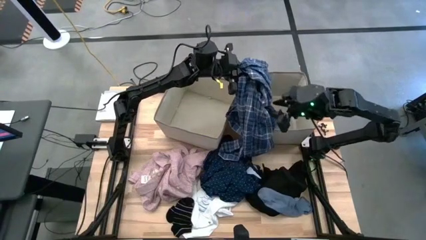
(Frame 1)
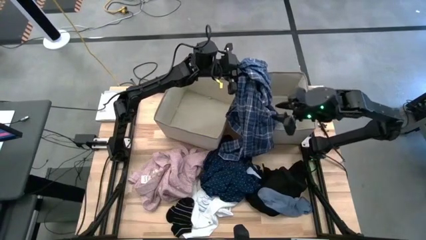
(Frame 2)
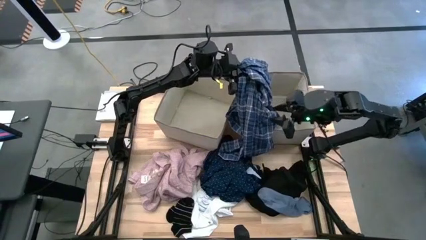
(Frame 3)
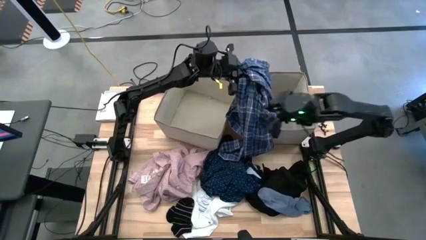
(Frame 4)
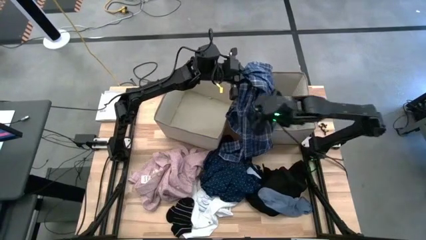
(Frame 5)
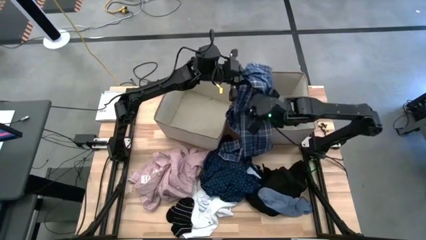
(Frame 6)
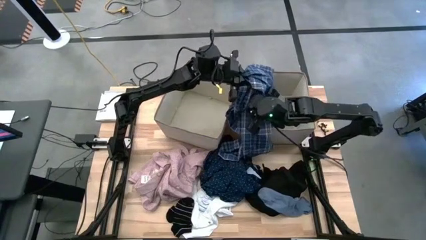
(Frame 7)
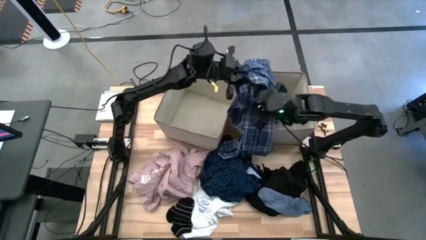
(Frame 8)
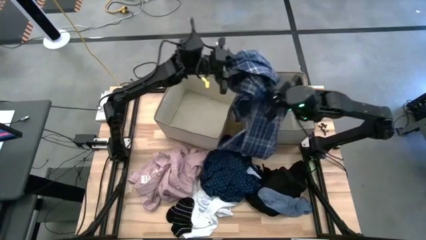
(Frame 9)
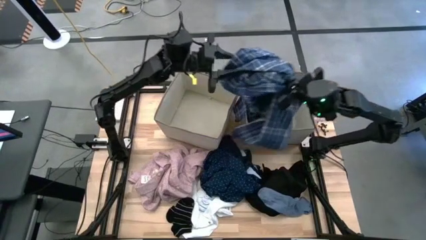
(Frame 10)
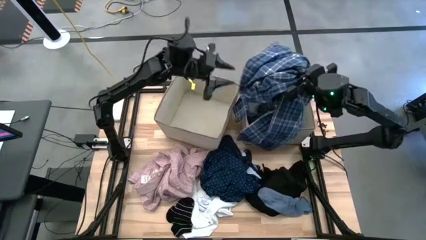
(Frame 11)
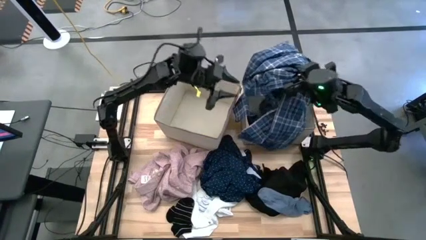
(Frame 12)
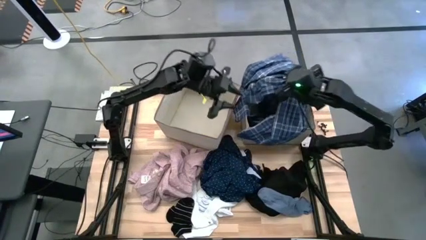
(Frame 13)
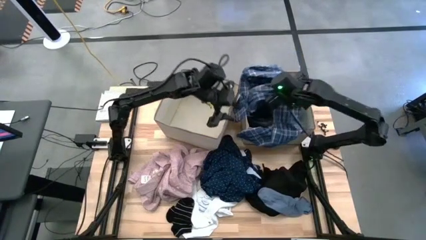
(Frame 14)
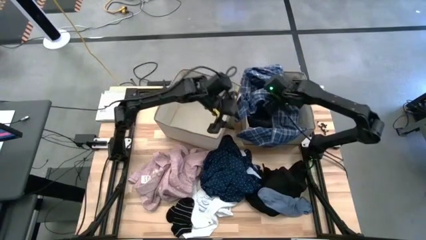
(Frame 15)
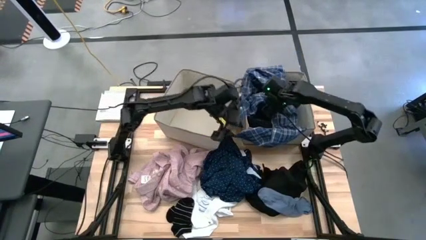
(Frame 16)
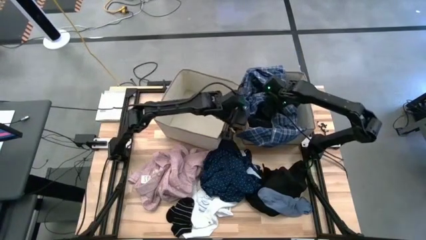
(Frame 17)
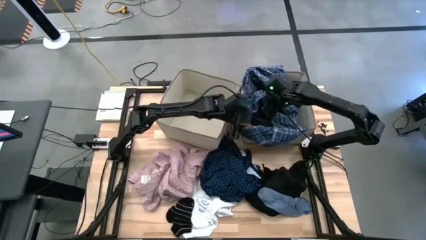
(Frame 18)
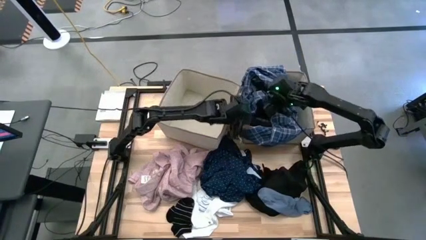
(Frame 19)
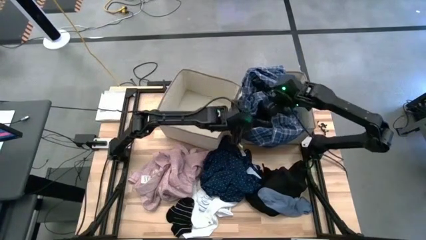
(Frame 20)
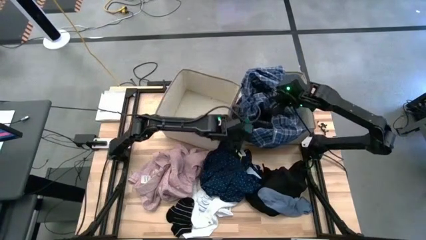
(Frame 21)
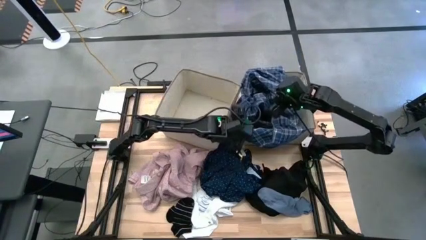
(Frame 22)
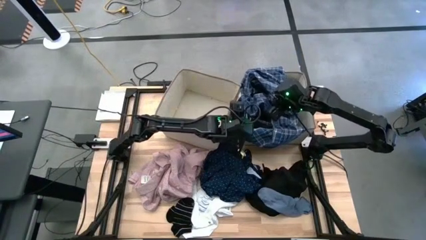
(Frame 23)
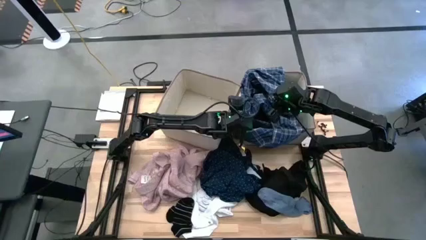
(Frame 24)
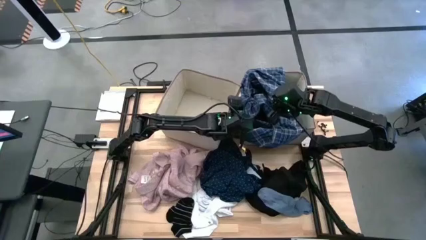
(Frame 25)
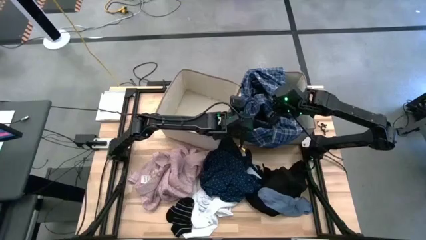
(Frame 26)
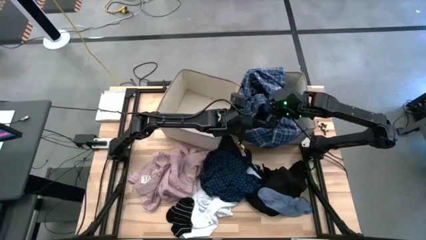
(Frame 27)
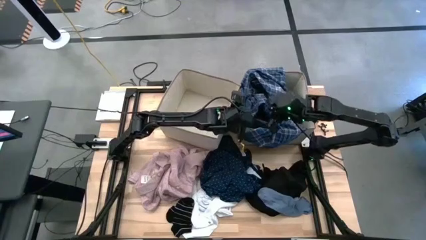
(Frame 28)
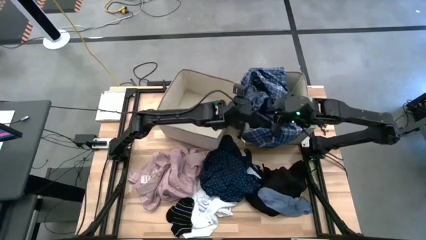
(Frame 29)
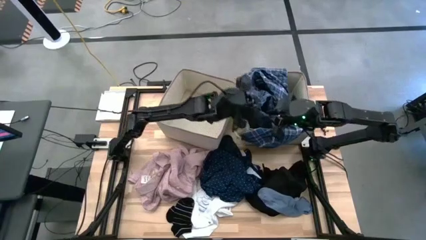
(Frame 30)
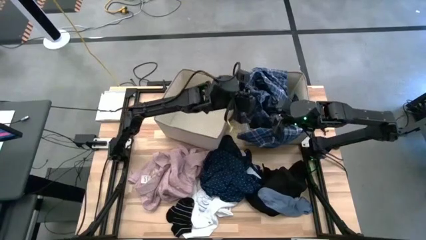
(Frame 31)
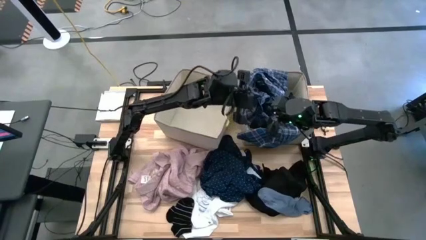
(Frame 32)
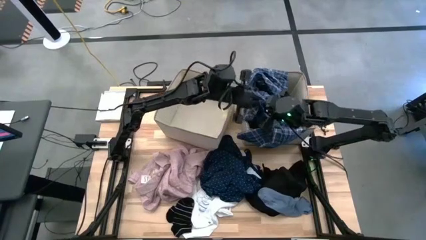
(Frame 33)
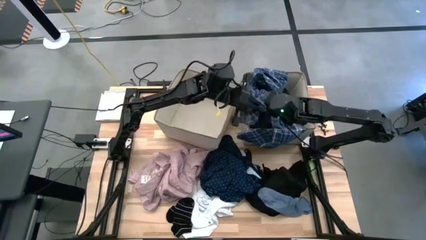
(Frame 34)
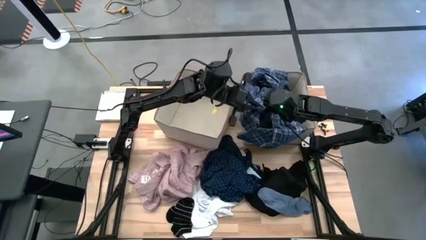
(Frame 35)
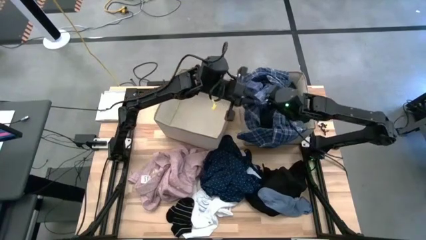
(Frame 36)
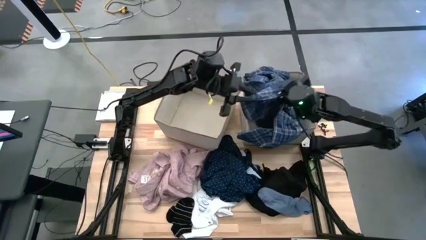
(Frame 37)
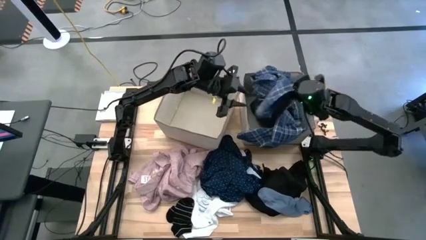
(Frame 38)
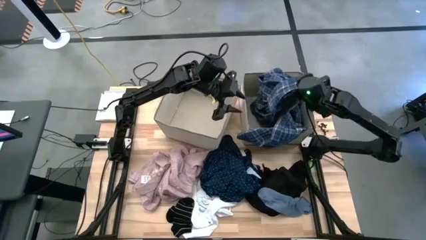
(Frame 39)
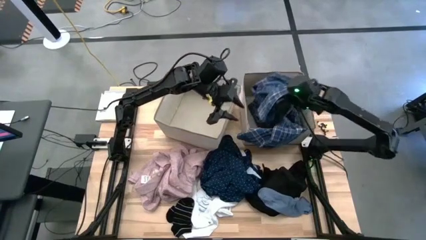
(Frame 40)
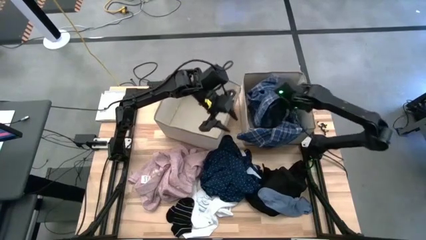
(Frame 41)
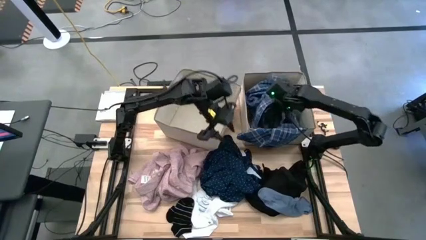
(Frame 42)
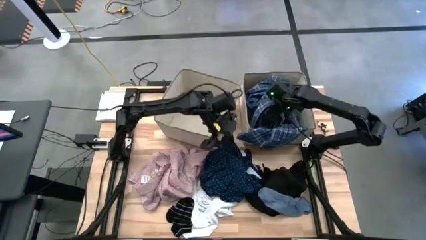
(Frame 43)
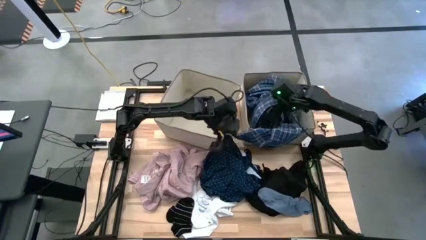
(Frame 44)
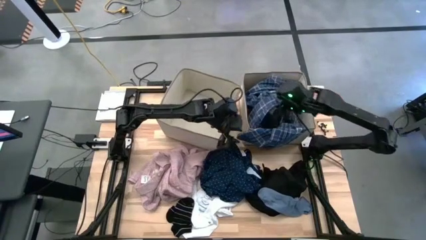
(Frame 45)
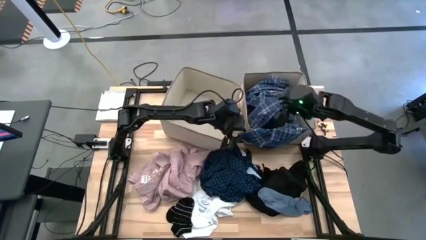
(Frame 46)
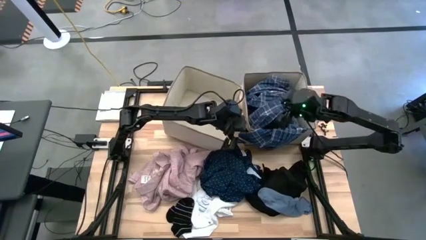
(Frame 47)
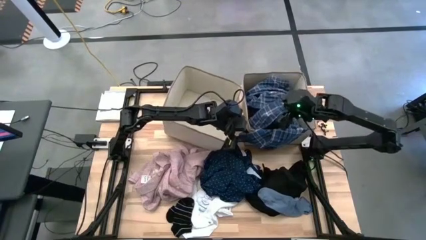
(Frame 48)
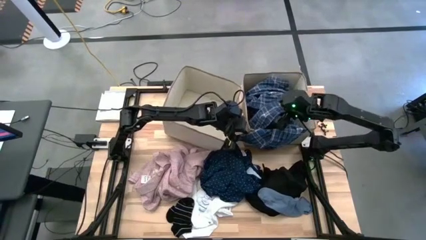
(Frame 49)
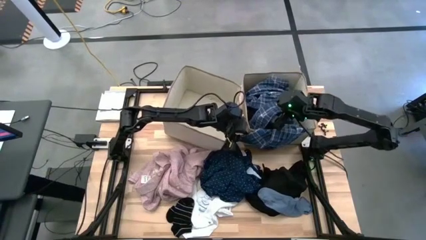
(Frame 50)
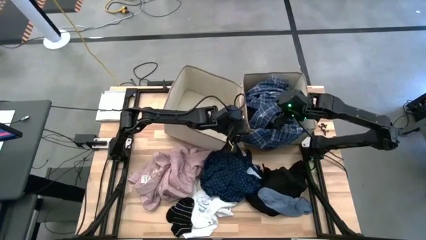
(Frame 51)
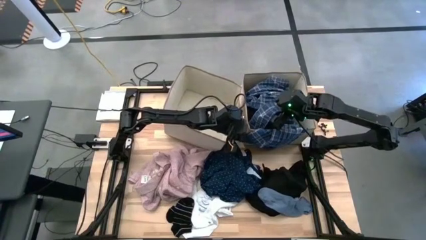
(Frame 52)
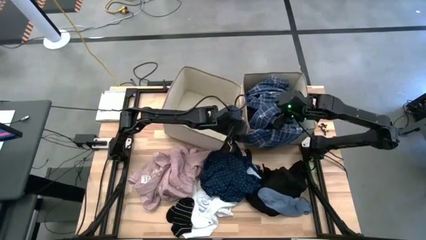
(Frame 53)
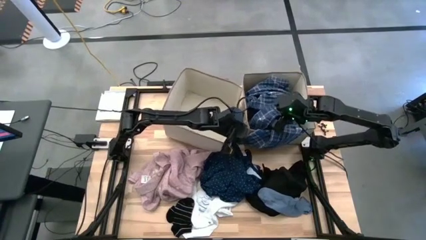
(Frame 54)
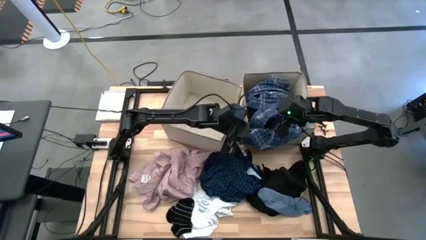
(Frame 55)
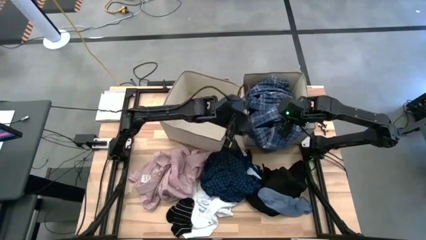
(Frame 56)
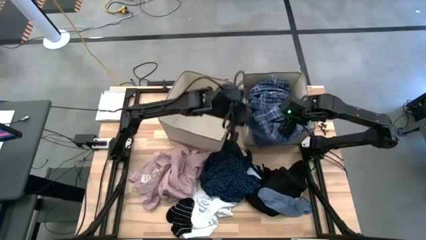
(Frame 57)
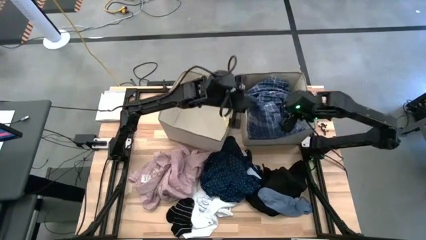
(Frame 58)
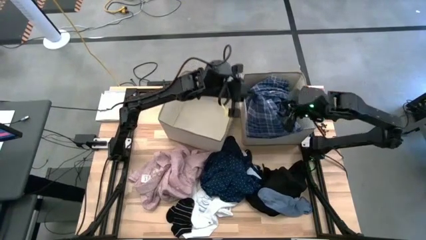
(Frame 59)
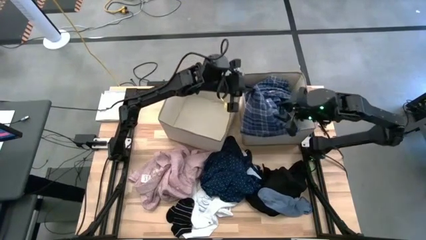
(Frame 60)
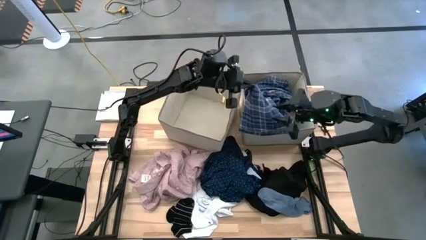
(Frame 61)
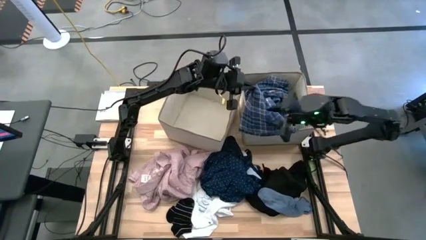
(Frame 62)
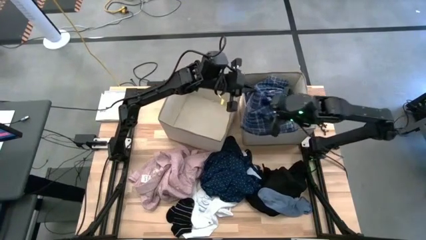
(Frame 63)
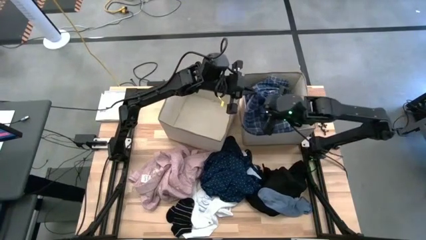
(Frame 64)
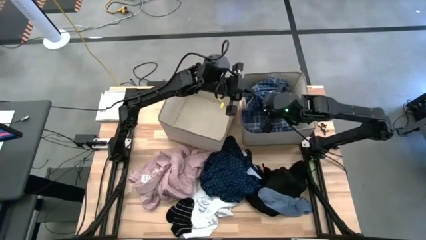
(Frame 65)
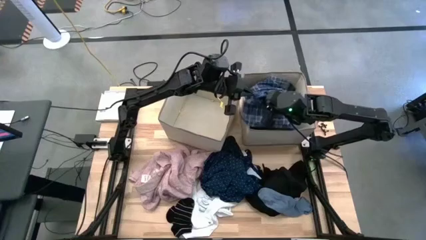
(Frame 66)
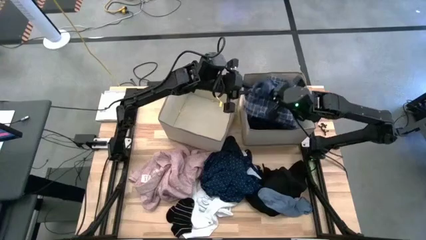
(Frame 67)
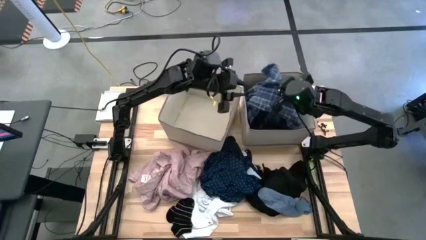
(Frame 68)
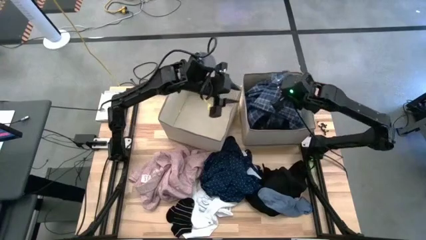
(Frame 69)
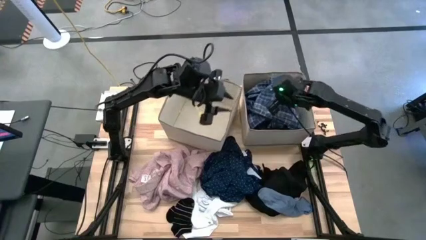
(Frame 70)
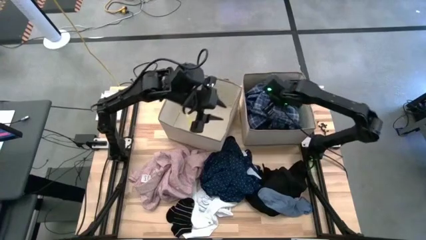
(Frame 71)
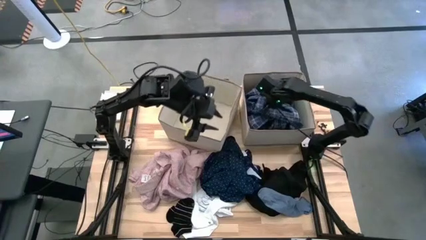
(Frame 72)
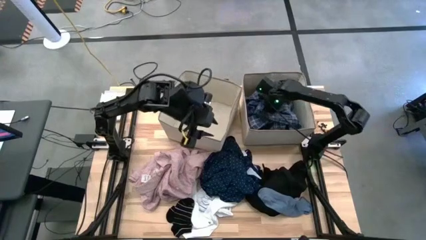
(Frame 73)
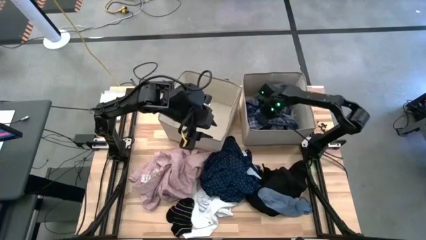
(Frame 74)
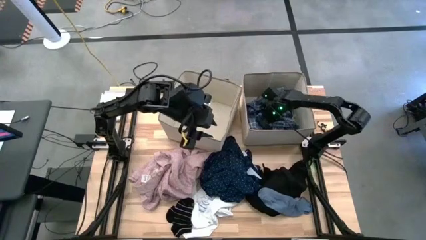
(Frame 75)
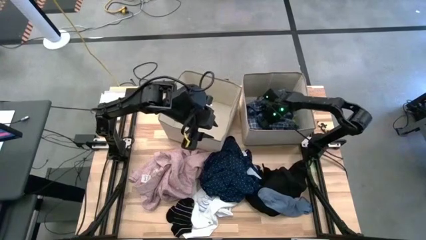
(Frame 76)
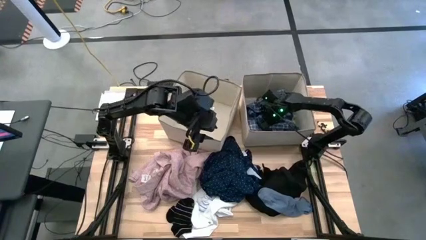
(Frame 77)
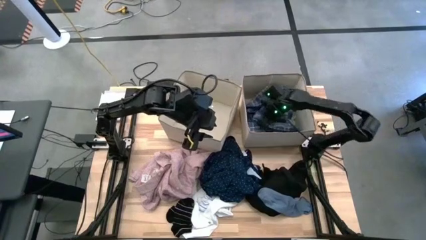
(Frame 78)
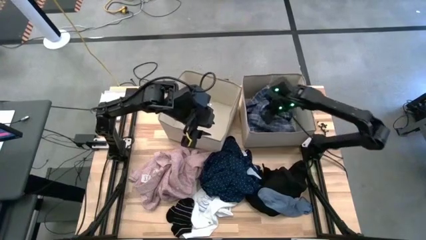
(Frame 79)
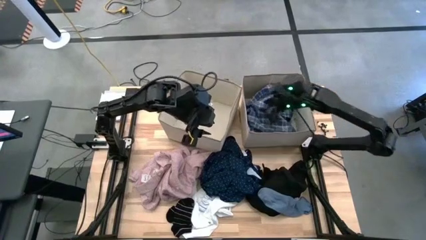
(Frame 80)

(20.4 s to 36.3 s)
Task: Sort clothes
Put the blue plaid shirt into the right laundry organizer
